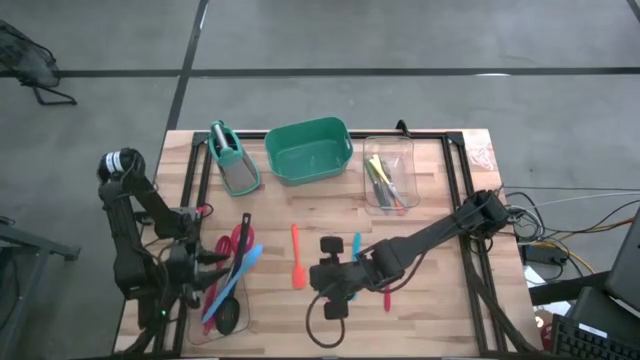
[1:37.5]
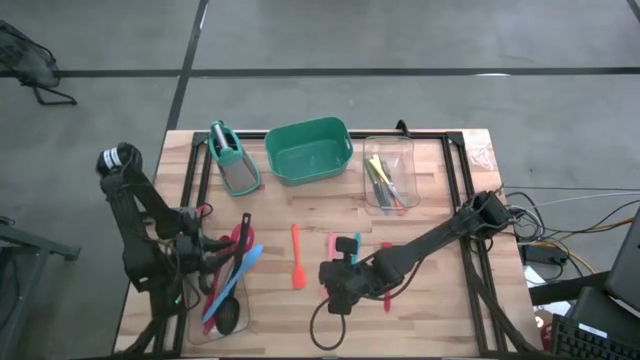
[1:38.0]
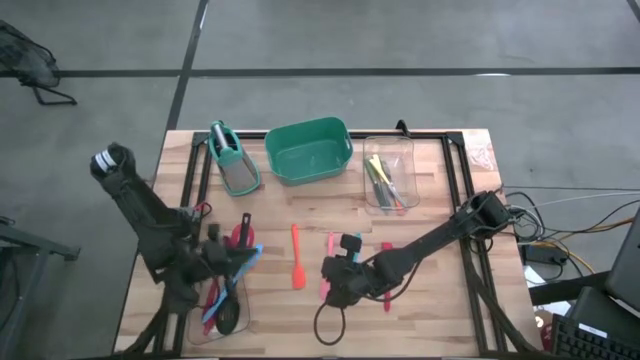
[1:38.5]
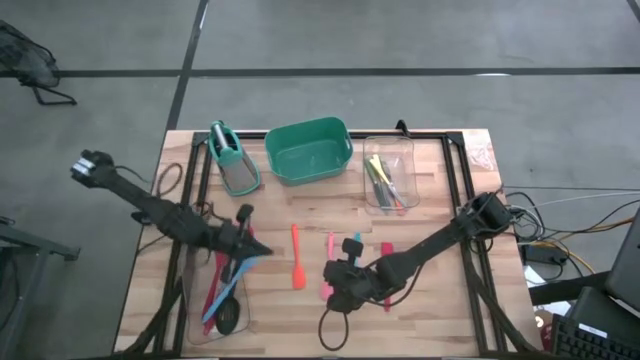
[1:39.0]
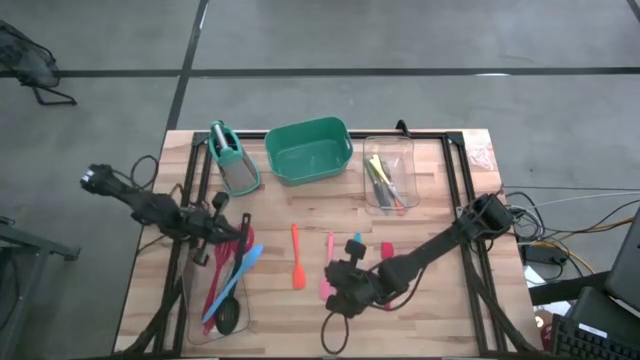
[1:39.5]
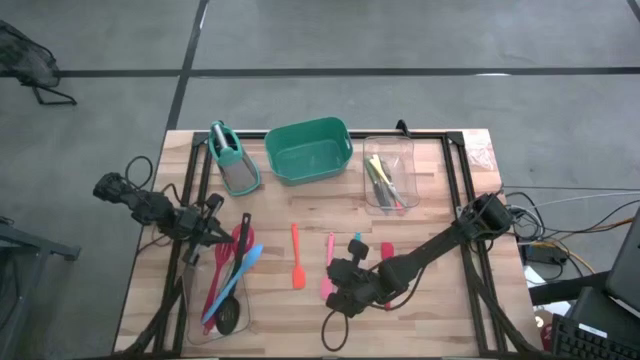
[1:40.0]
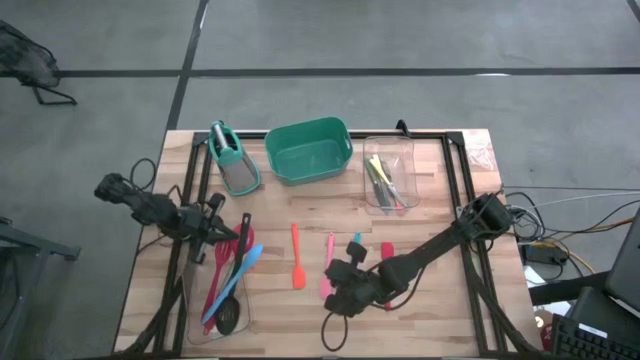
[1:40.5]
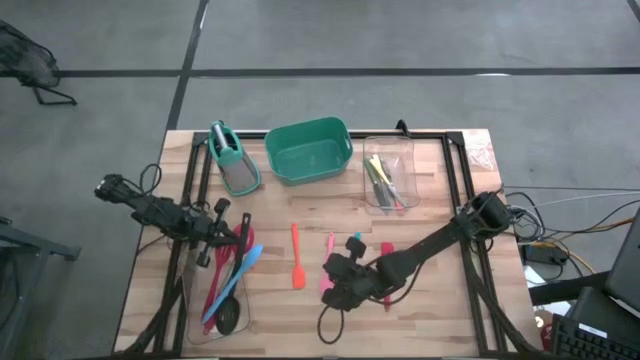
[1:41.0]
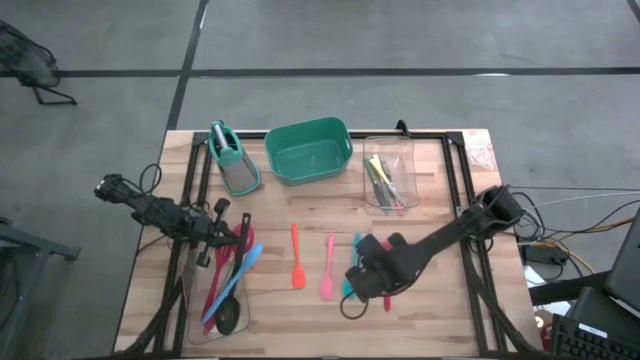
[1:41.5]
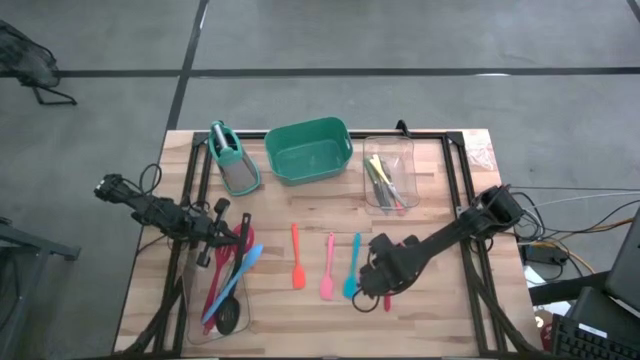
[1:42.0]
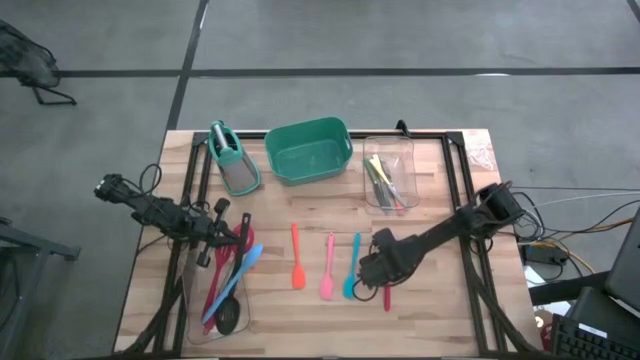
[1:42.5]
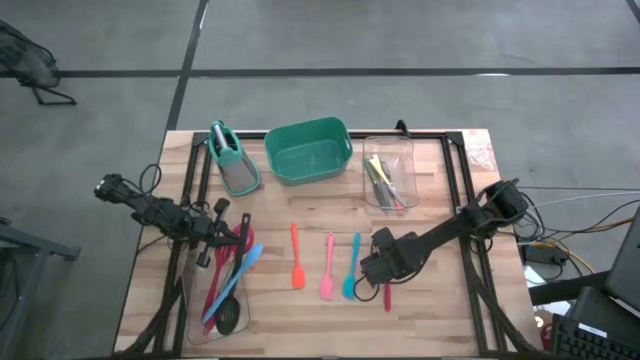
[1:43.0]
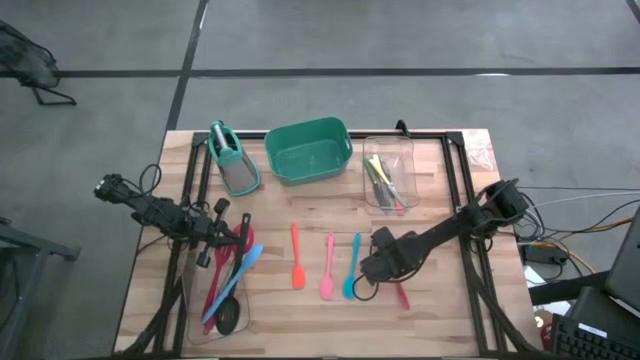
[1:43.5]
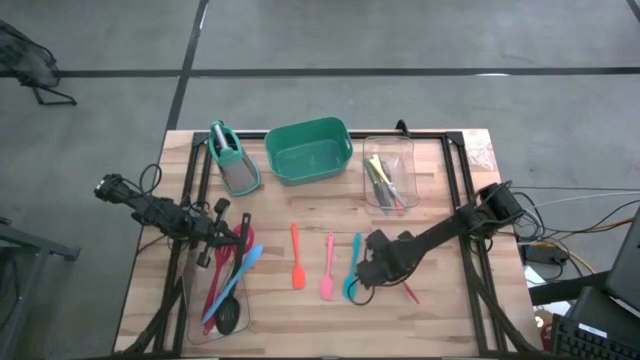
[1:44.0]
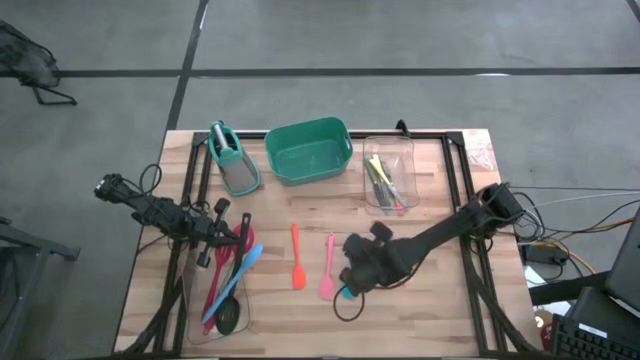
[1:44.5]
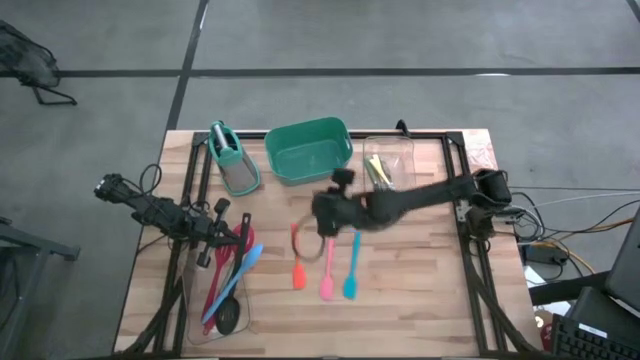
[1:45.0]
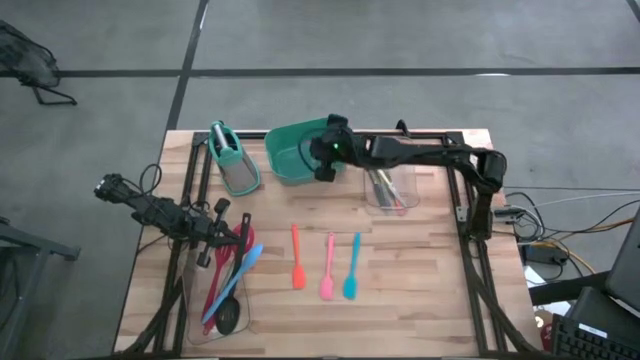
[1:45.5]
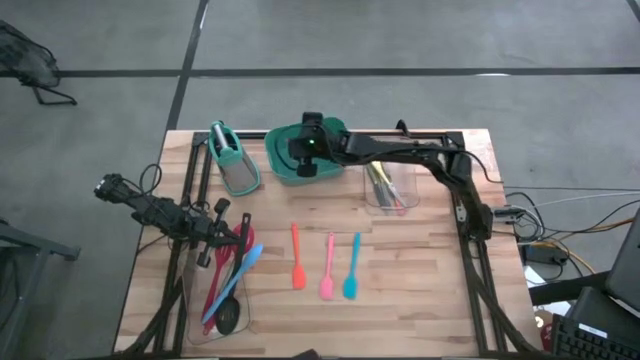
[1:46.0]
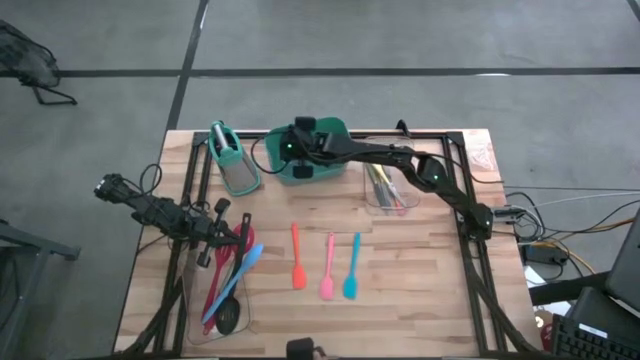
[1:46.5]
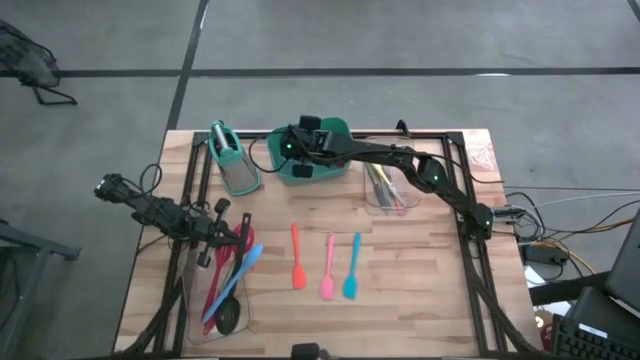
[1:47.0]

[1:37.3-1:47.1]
Task: Pick & Place Kitchen Items
Put the red spatula into the green bin

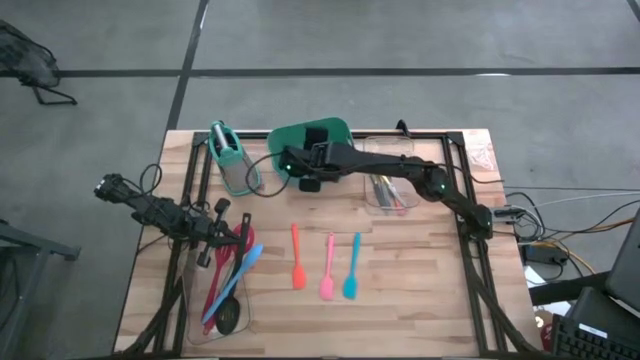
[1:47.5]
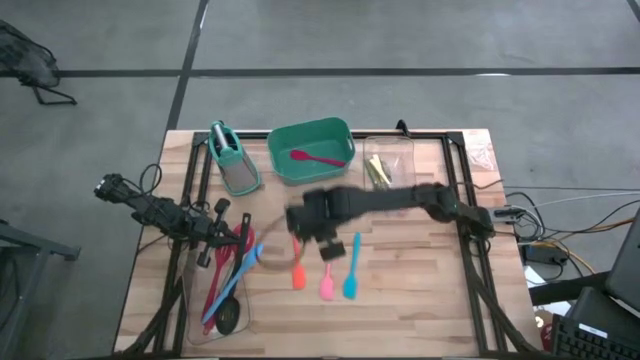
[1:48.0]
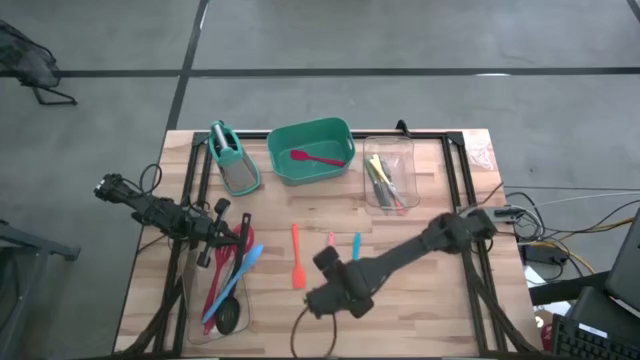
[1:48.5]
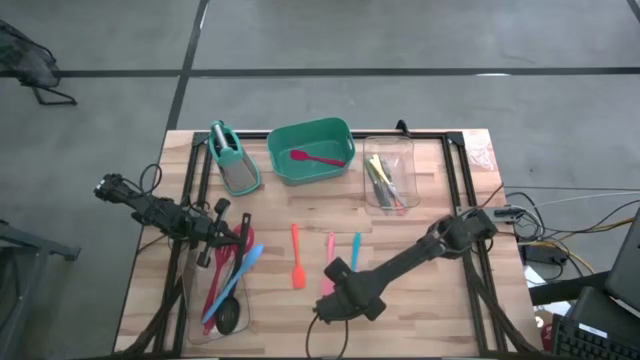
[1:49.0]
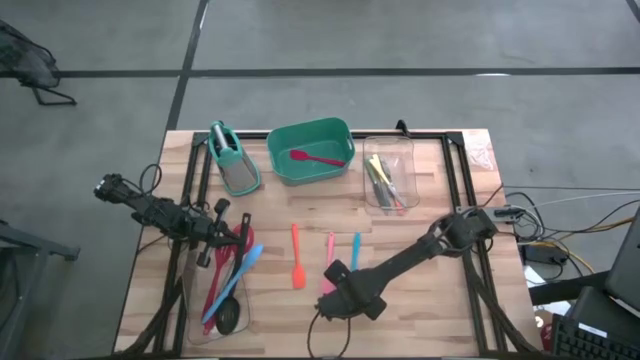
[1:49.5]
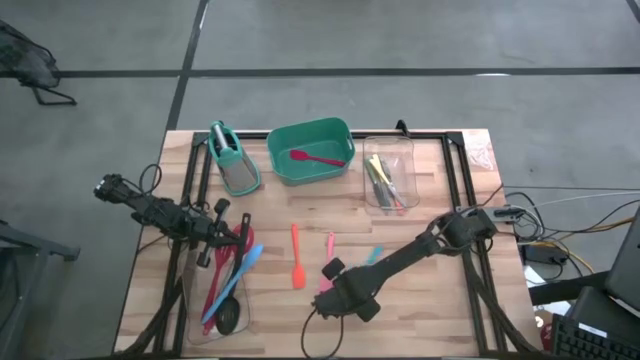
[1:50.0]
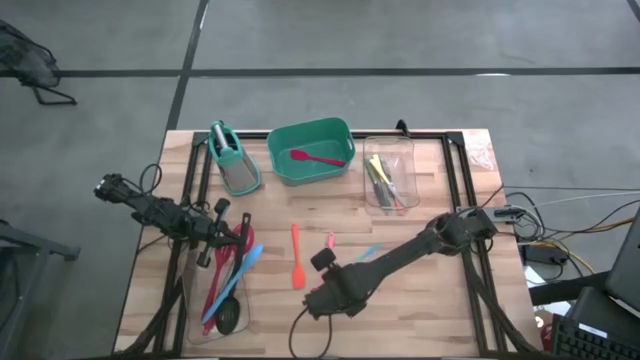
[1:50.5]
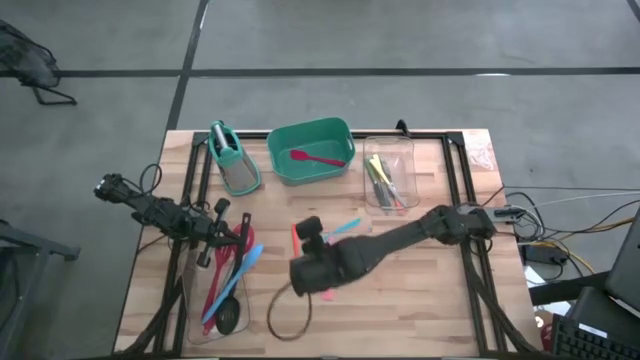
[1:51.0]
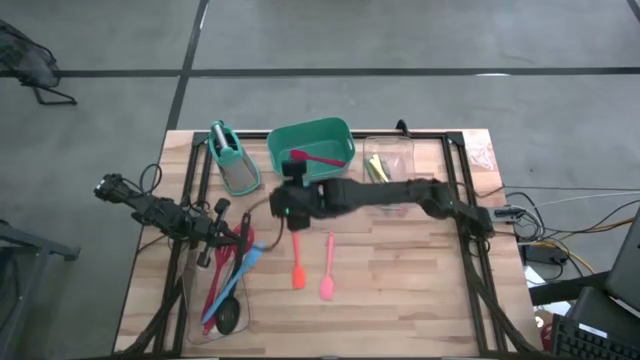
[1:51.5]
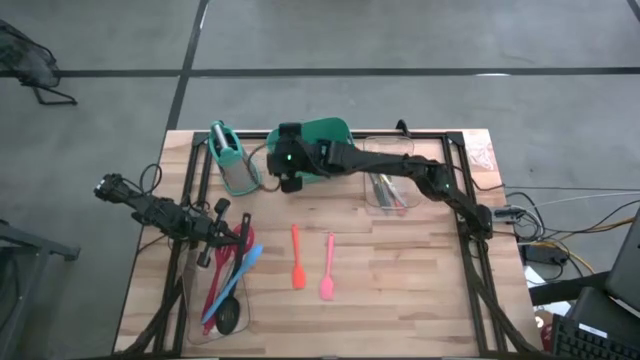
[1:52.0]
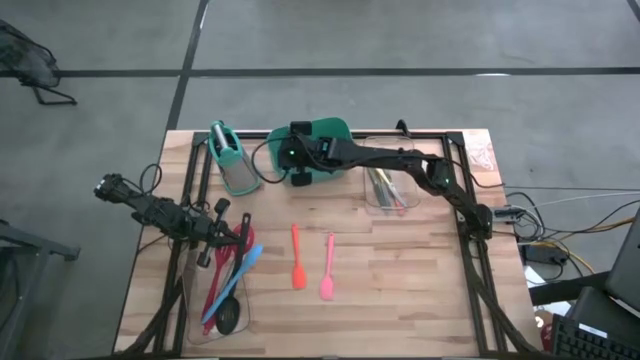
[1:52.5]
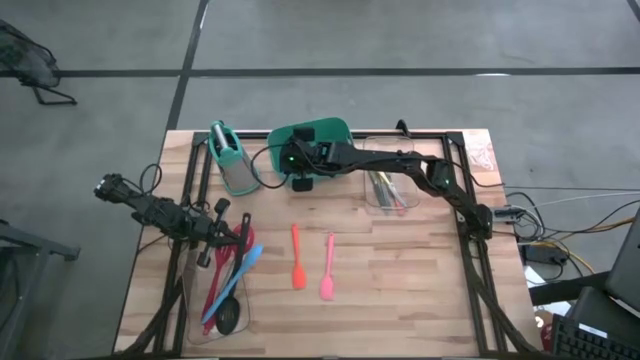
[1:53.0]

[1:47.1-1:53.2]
Put the blue spatula into the green bin

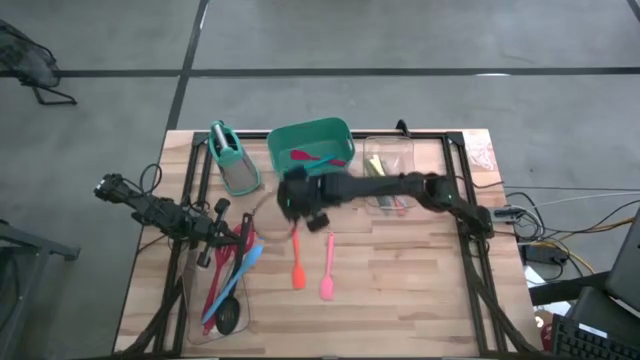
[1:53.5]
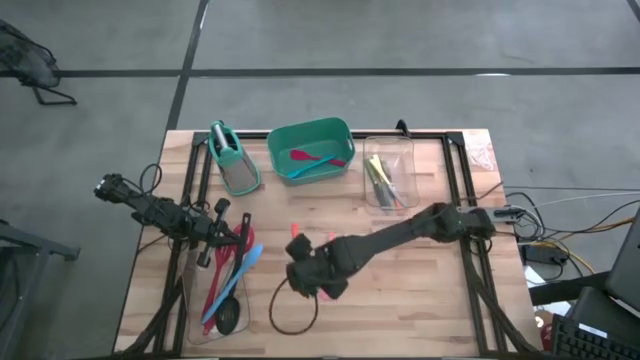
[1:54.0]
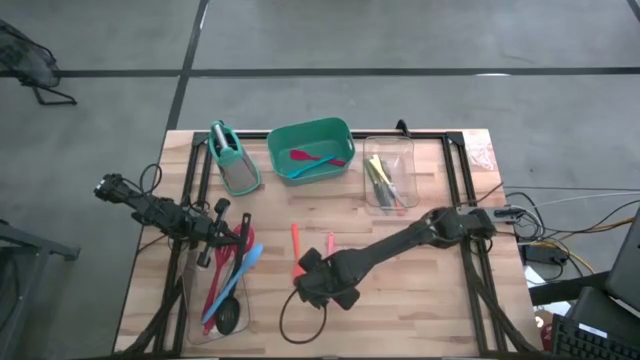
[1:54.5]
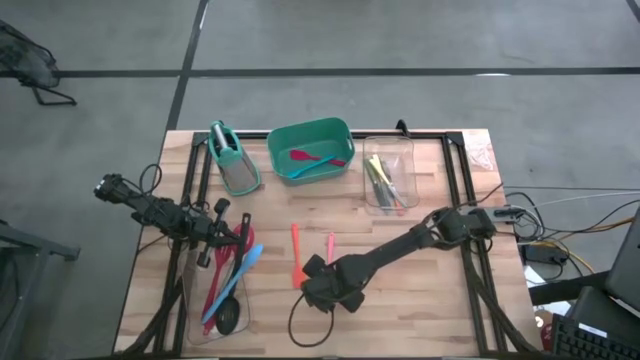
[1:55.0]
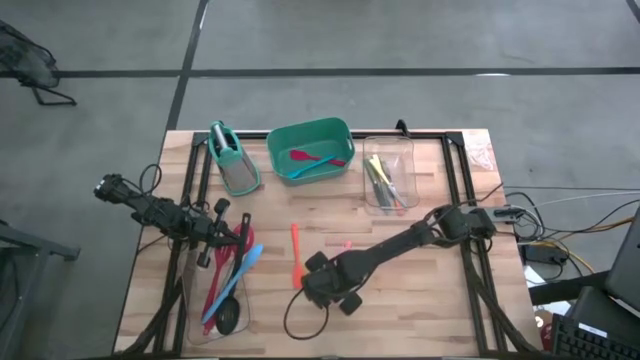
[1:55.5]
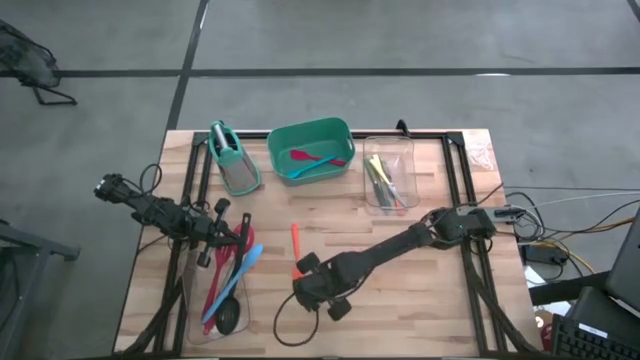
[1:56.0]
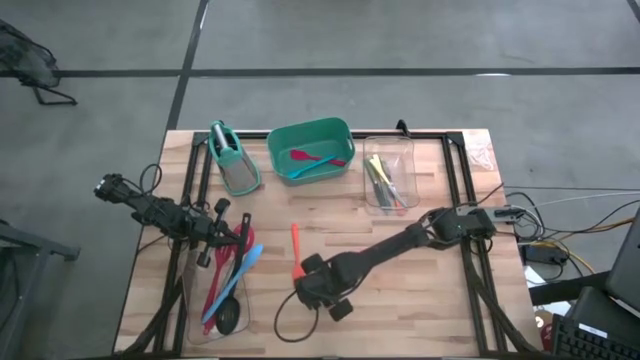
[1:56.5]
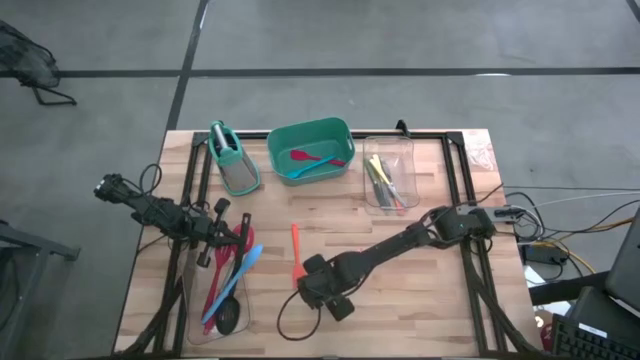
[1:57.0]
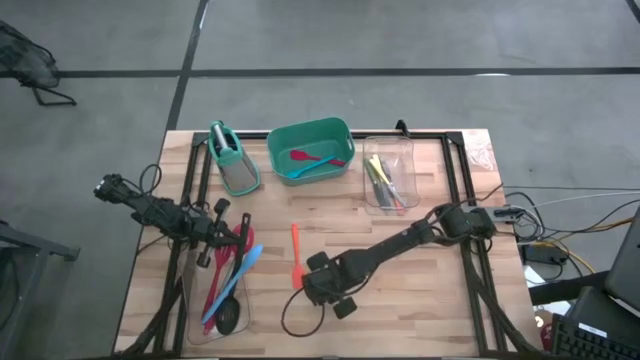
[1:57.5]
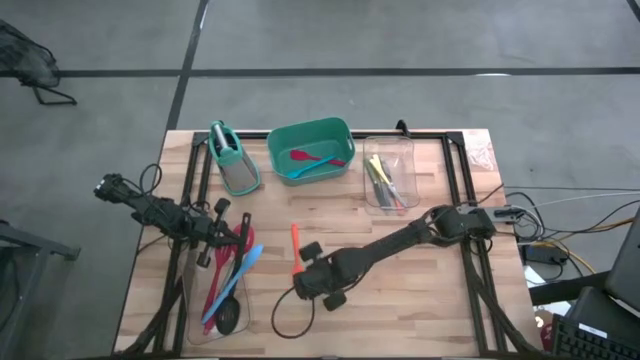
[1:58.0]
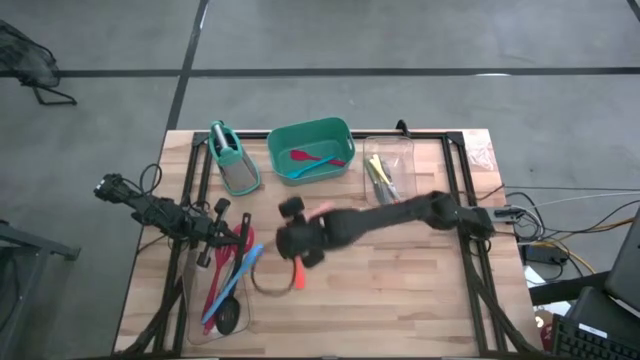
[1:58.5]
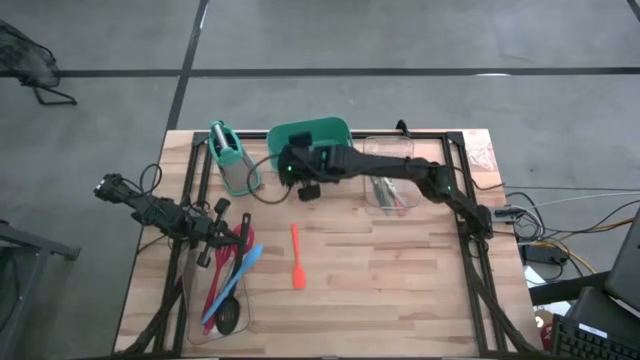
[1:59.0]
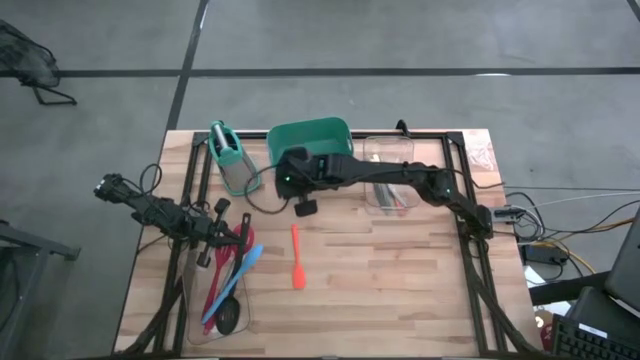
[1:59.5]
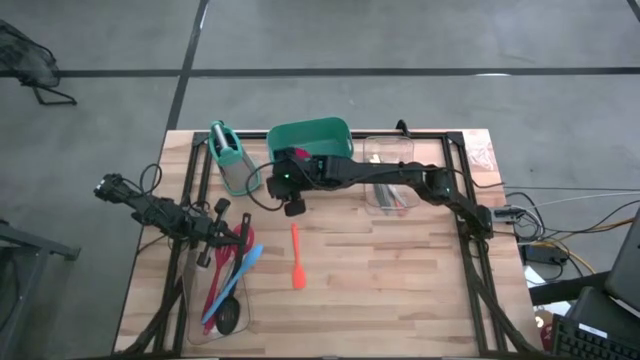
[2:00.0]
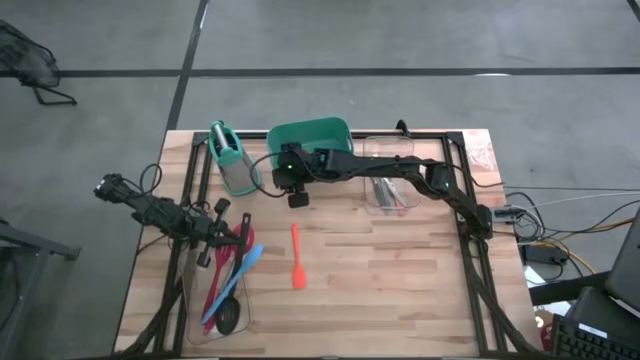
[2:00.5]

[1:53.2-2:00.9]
Put the pink spatula into the green bin
